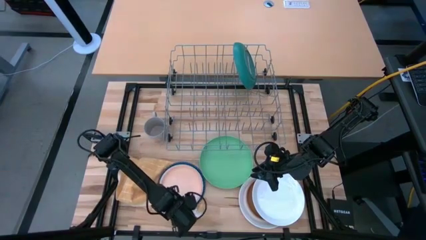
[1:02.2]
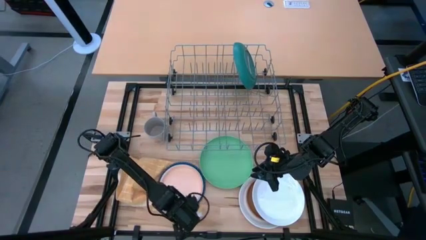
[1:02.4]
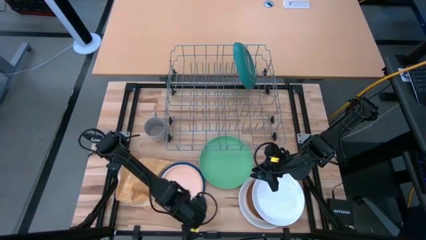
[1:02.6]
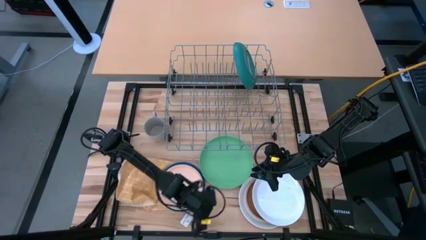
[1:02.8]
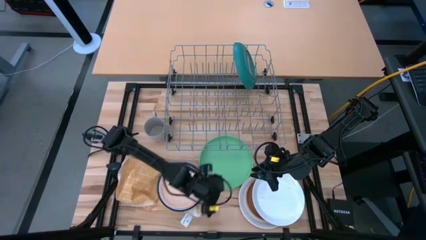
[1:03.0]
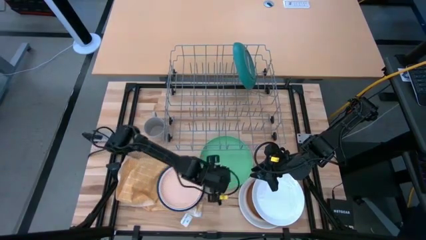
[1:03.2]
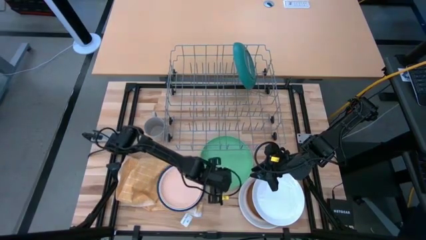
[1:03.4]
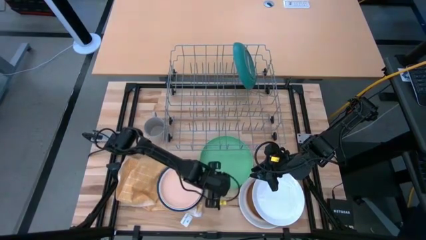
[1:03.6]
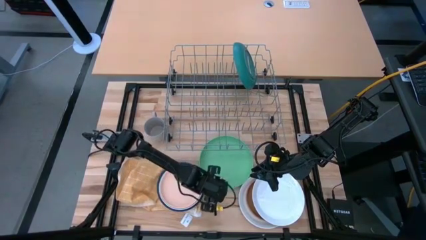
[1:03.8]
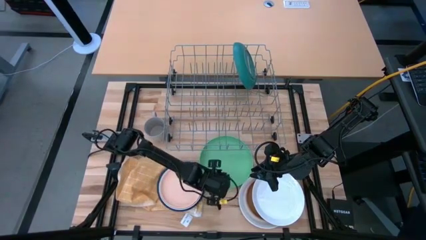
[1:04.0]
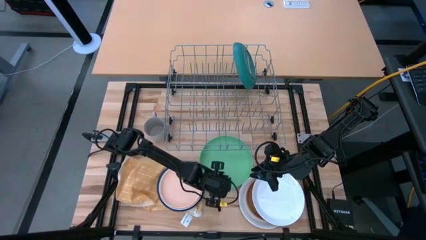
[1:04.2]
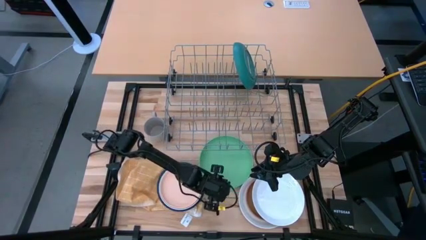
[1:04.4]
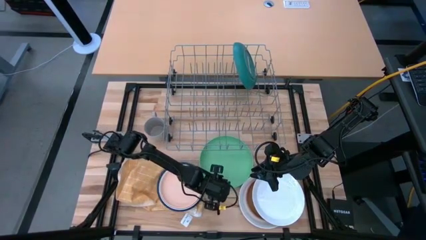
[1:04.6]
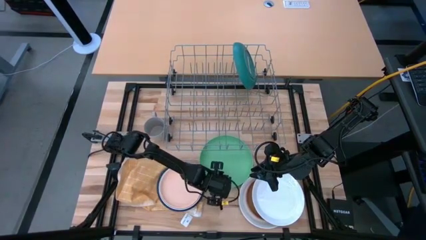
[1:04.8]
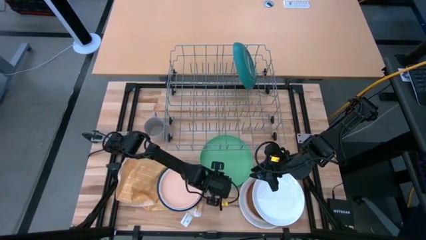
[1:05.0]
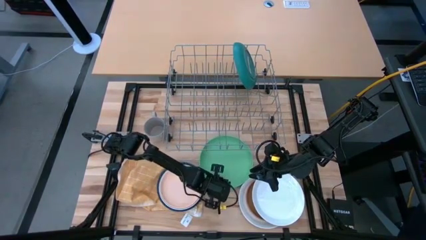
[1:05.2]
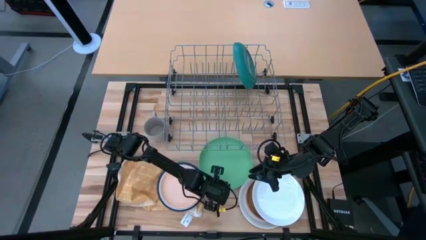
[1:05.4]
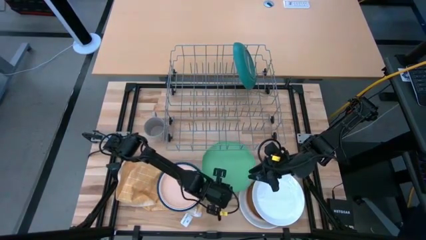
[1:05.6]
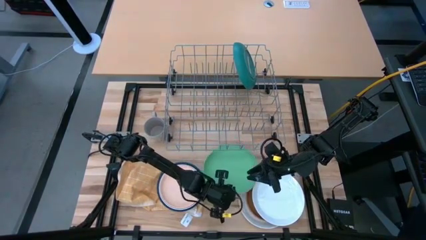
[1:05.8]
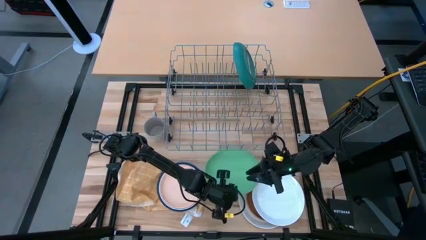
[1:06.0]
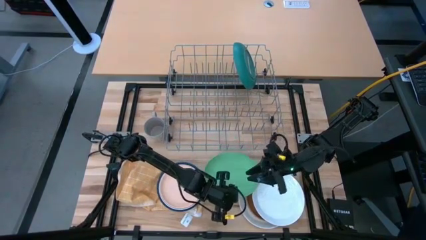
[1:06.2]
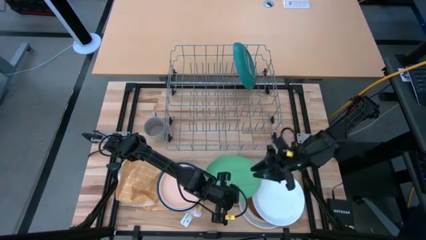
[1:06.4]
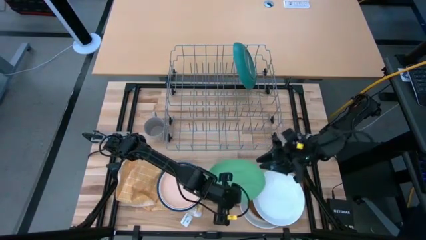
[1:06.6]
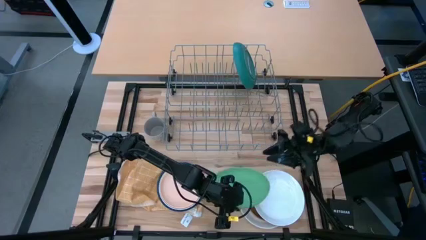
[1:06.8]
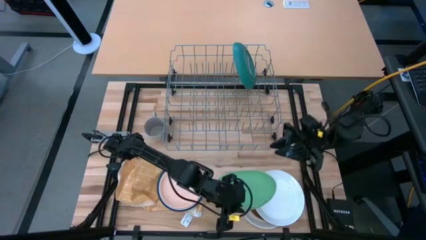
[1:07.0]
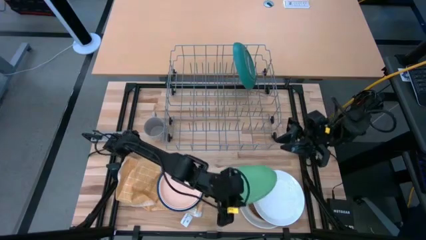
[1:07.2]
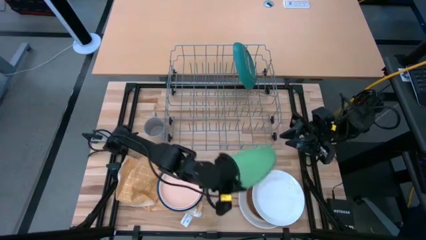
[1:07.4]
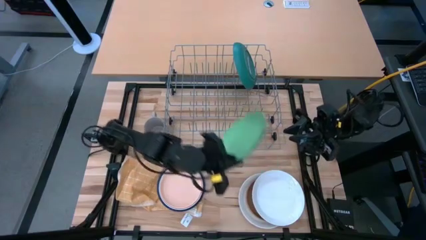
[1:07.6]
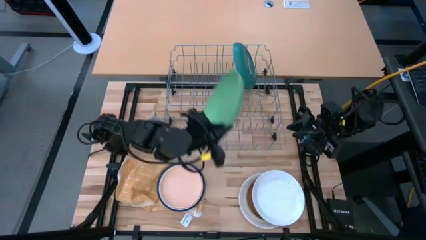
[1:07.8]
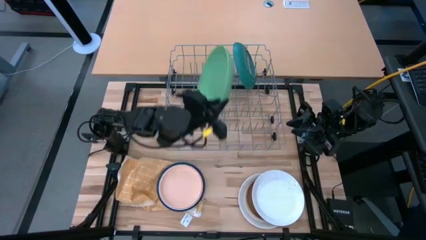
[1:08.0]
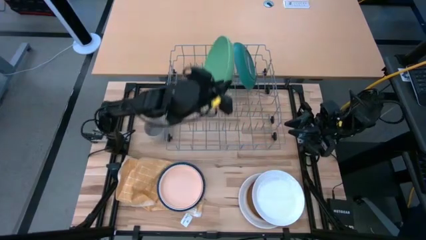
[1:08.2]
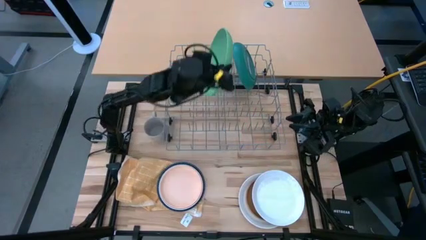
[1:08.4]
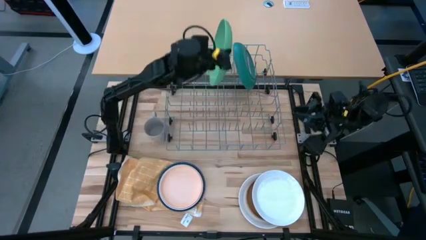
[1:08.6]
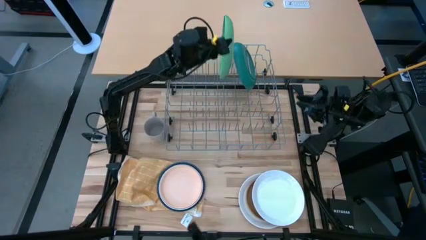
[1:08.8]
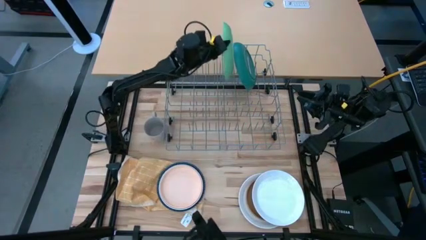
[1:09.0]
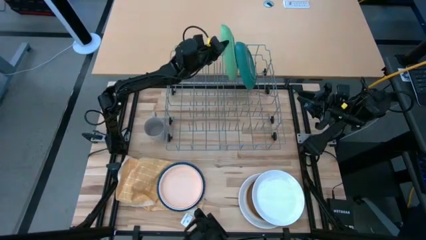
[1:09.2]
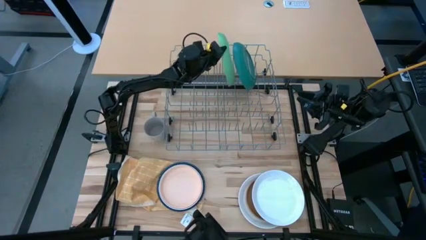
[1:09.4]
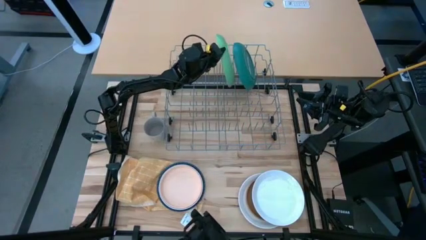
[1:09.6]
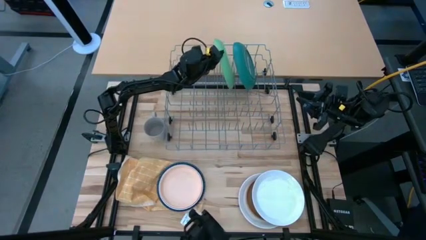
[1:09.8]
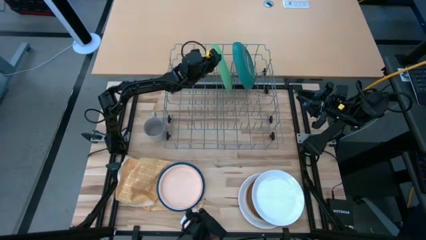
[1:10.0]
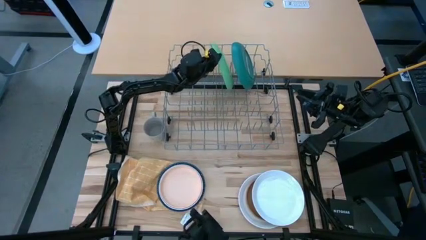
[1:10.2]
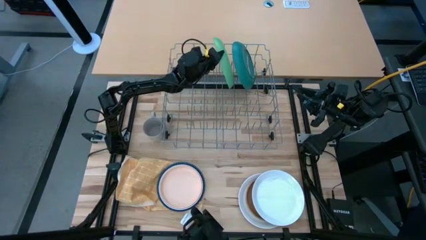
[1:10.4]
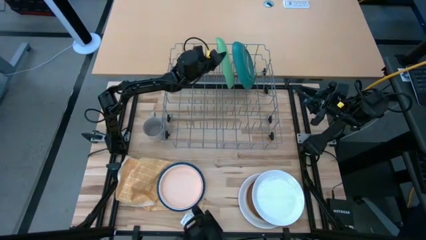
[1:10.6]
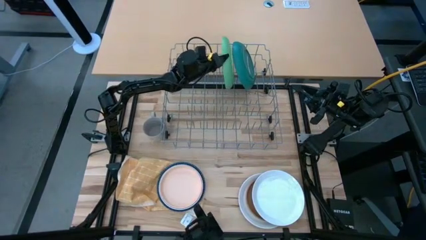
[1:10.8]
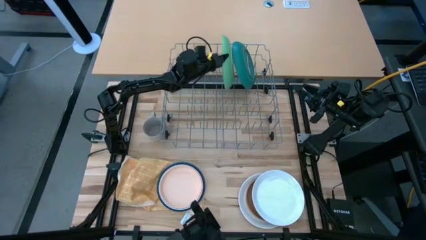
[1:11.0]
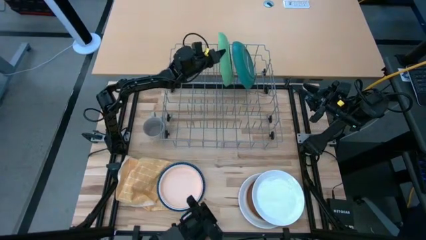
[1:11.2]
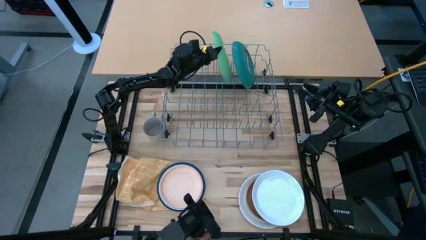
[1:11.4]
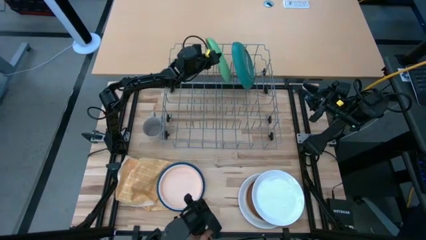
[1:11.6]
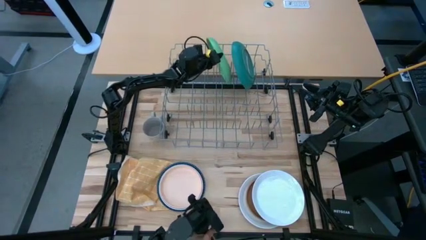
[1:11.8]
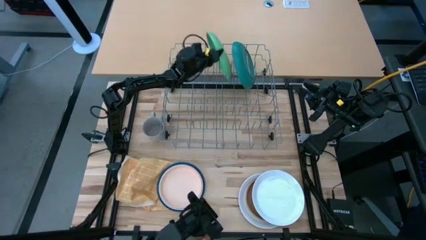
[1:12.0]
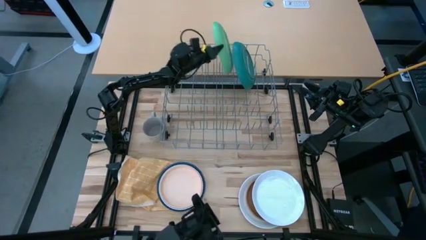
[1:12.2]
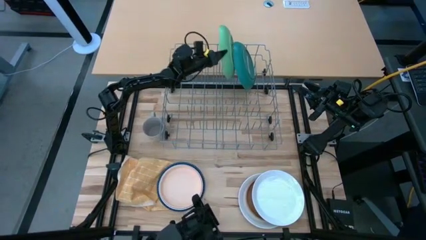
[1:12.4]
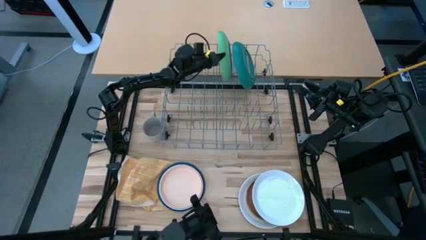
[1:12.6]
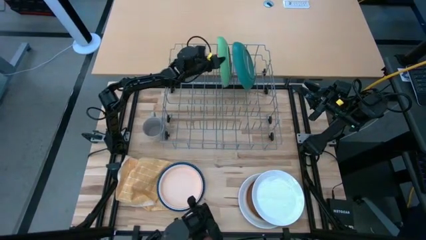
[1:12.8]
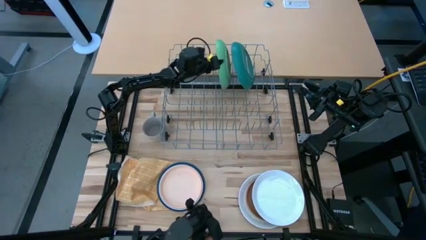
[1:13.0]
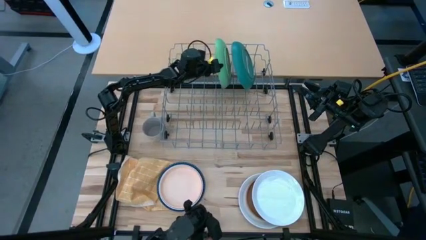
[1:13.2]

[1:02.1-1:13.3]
Task: Sort dishes
Put the light green plate in the dish rack
